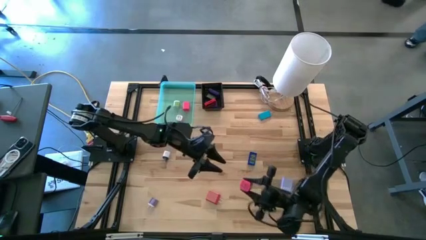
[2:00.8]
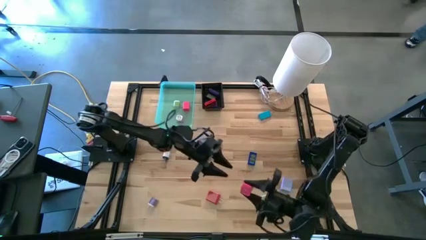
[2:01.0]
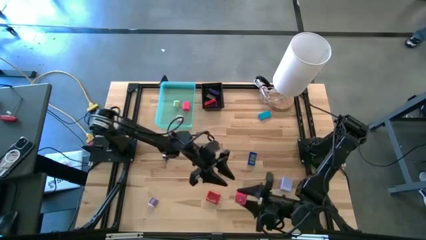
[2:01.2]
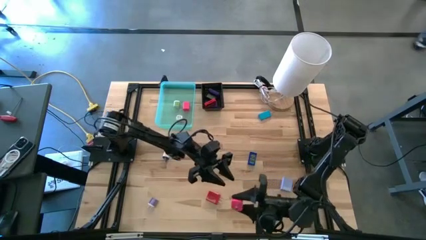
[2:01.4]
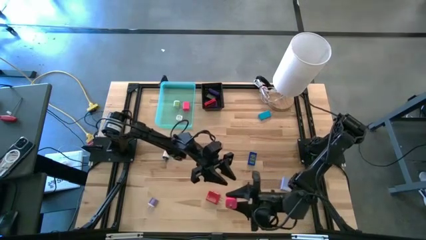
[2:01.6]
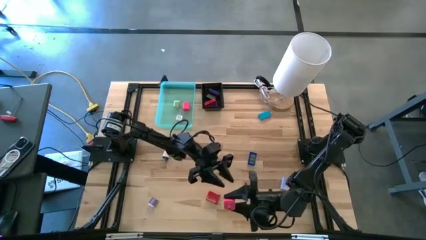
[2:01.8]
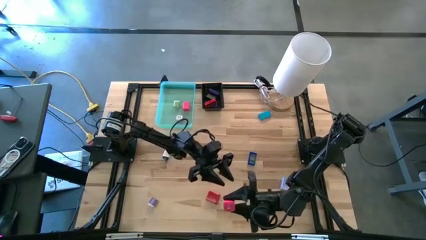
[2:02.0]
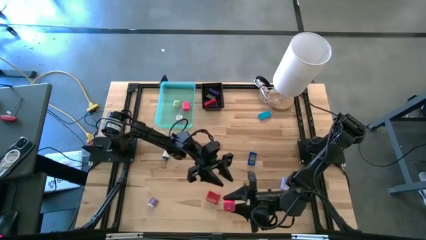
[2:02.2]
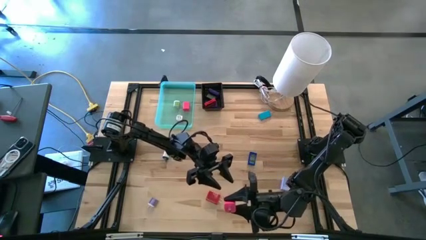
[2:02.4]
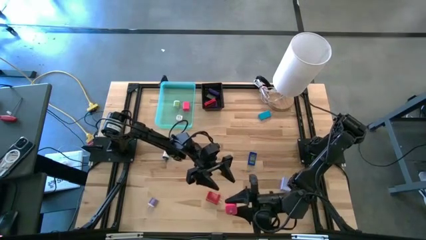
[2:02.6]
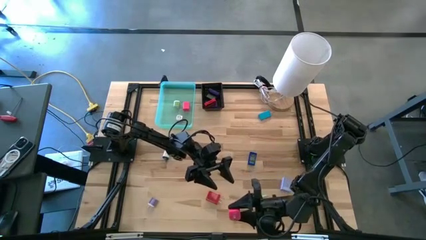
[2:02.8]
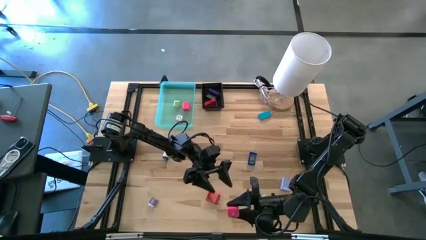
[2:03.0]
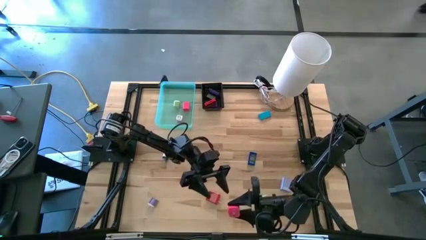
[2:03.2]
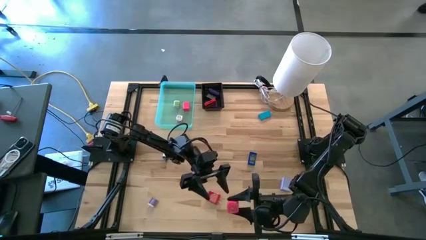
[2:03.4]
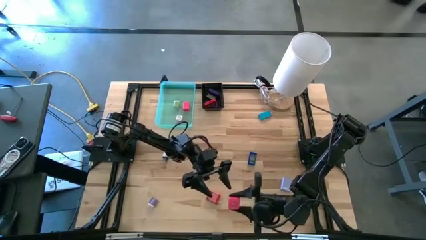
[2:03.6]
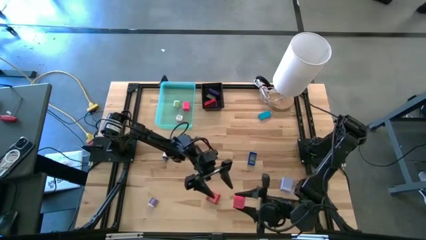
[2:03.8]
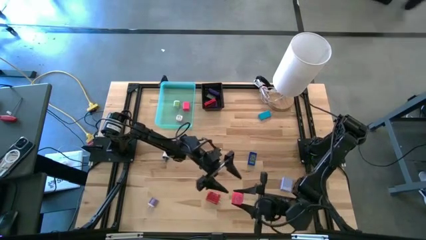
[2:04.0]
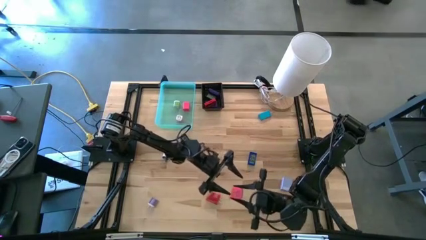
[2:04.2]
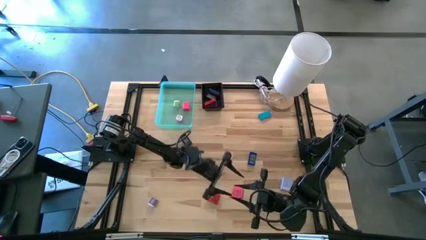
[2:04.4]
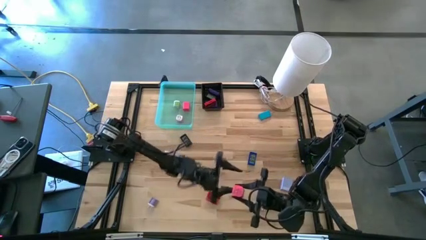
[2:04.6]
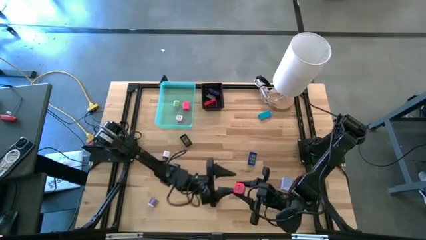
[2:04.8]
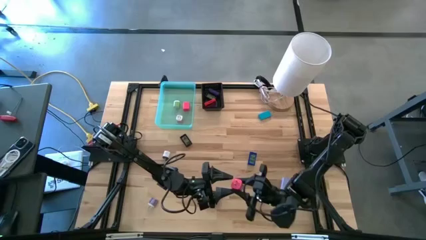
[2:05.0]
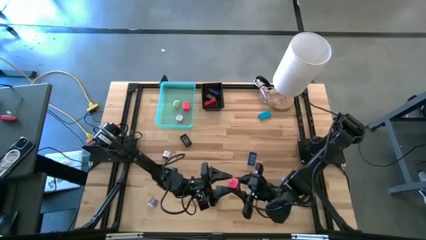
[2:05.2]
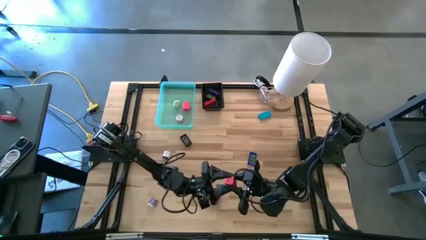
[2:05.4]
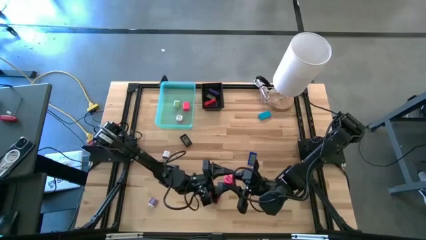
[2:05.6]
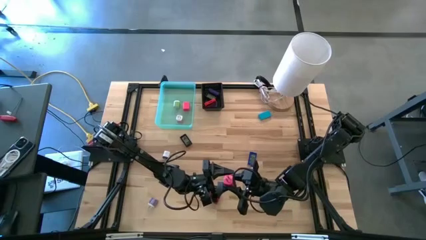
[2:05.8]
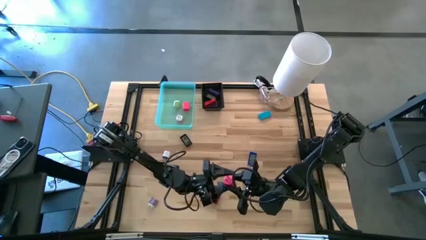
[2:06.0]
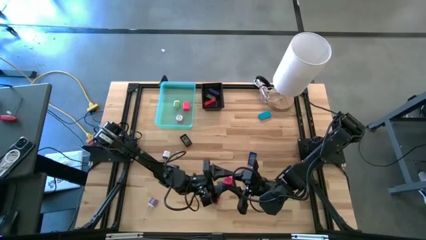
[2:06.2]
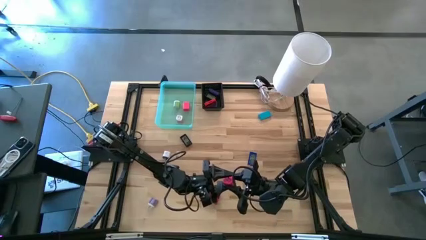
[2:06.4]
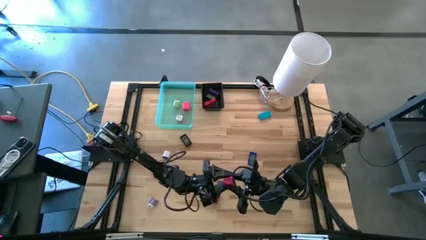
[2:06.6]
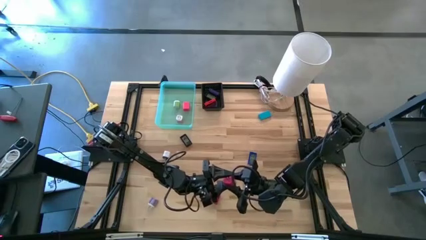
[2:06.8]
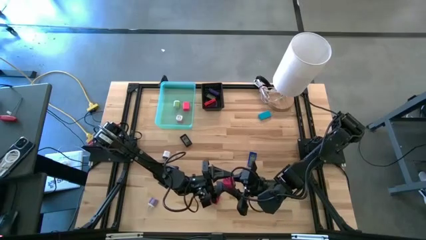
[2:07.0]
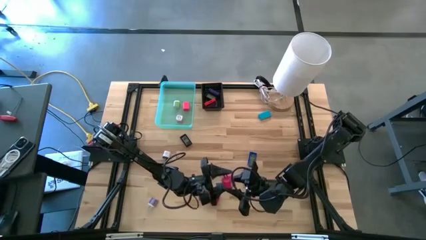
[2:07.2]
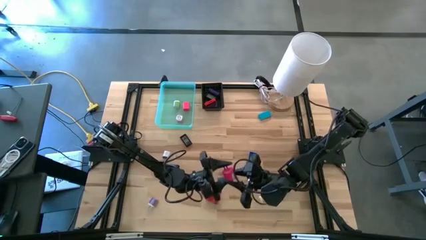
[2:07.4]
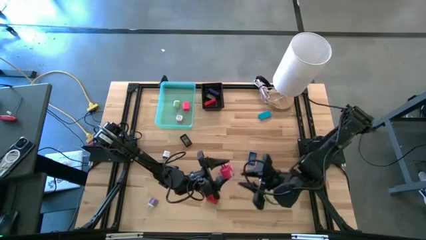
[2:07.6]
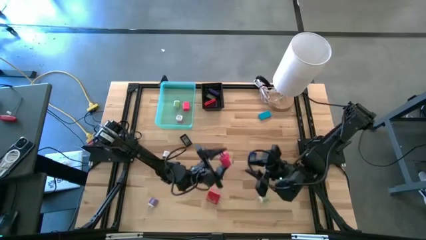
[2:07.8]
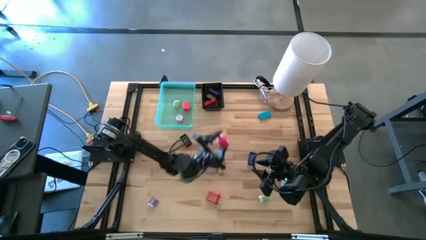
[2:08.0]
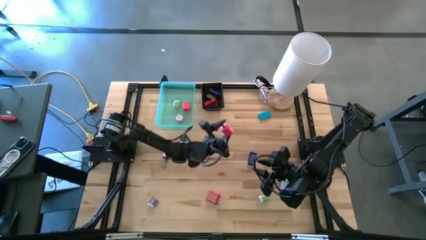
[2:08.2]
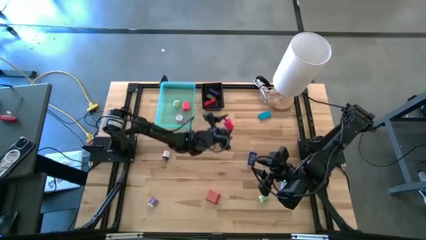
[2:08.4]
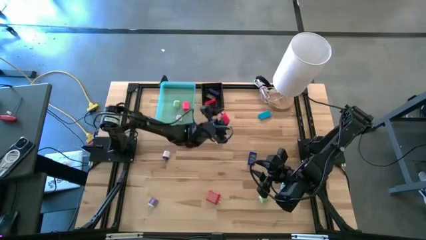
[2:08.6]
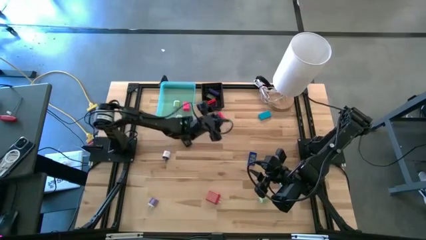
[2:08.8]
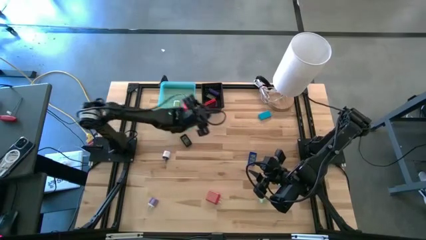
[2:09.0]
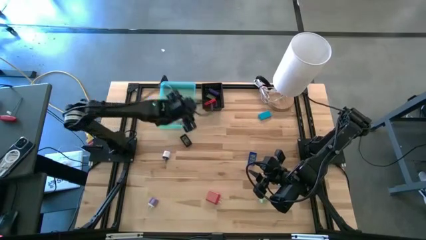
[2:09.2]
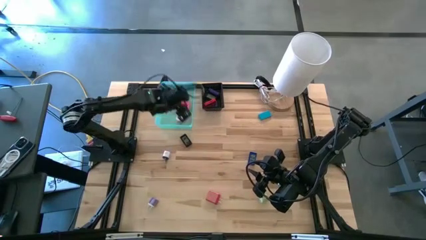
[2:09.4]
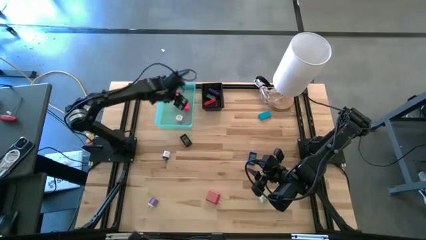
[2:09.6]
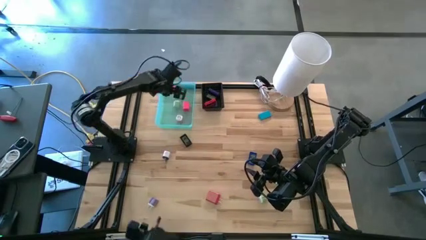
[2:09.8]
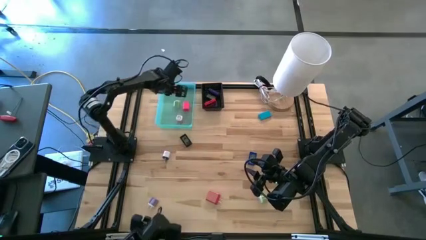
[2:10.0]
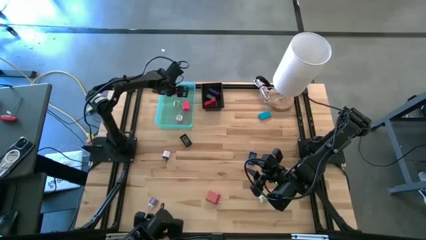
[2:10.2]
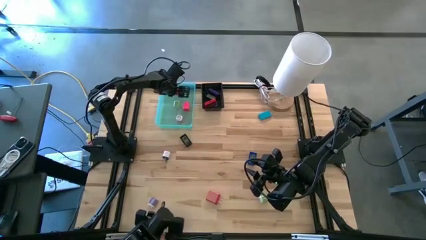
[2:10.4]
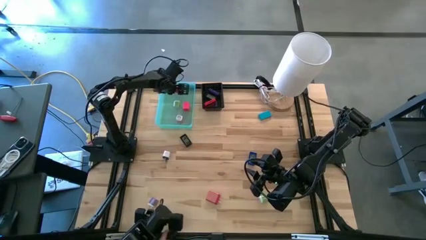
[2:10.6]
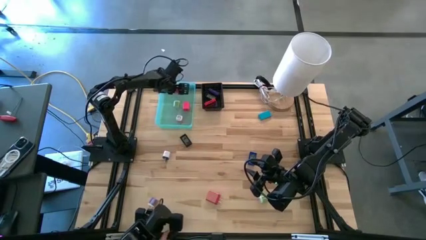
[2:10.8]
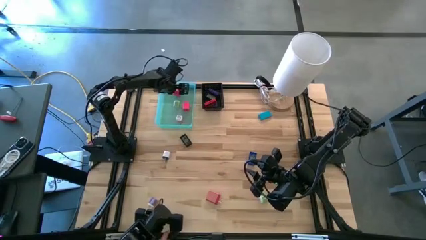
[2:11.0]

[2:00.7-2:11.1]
Task: Pick & Place Office items
Put the pink charger adapter into the green bin

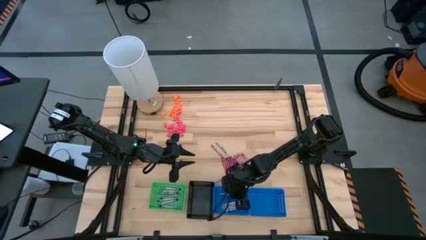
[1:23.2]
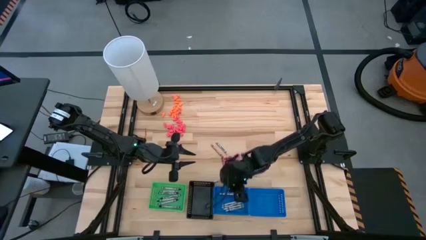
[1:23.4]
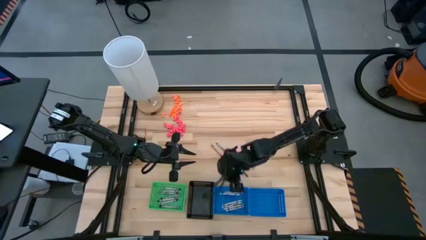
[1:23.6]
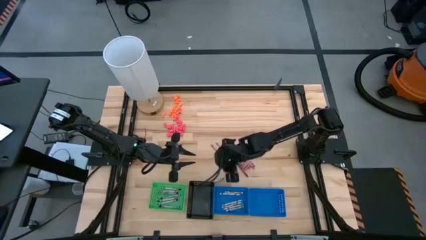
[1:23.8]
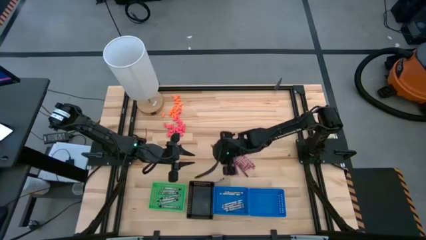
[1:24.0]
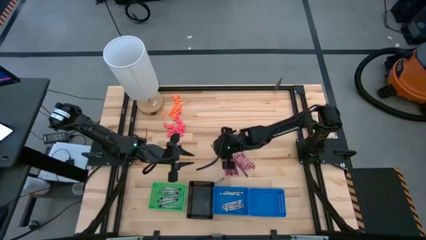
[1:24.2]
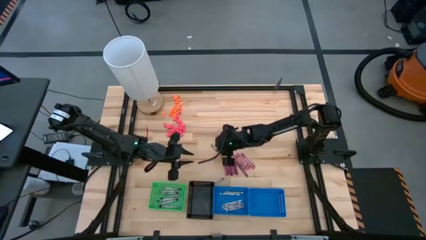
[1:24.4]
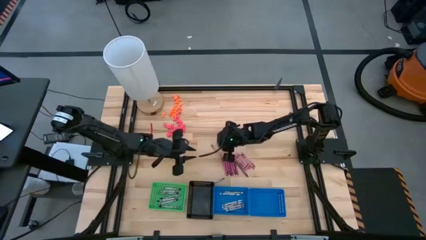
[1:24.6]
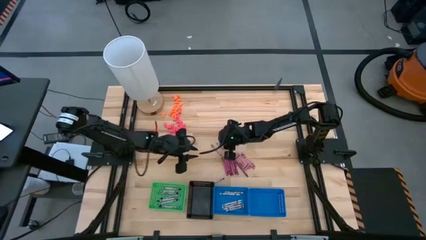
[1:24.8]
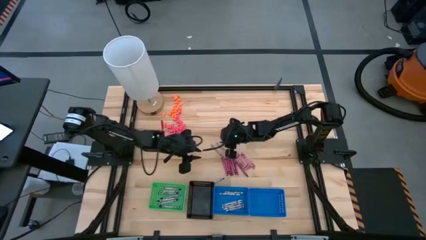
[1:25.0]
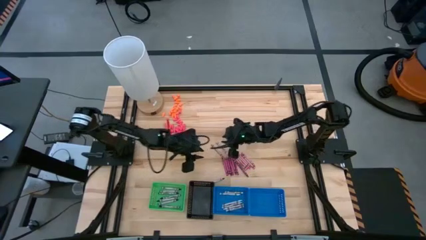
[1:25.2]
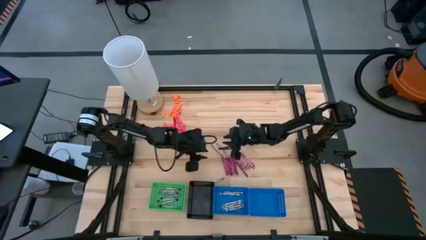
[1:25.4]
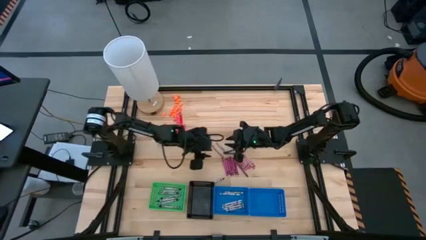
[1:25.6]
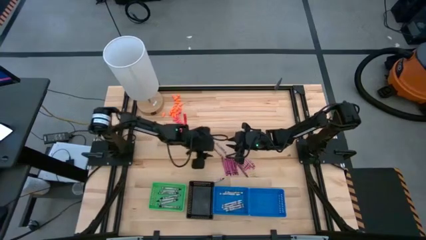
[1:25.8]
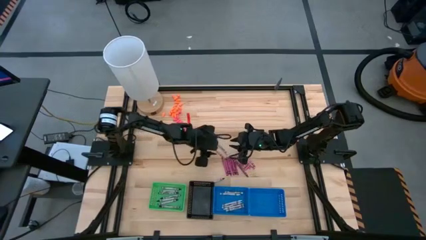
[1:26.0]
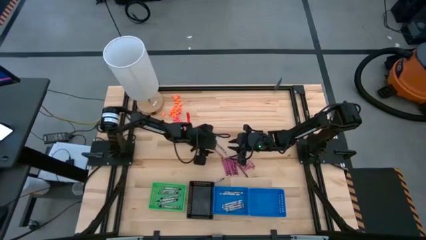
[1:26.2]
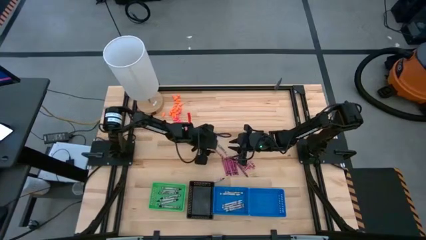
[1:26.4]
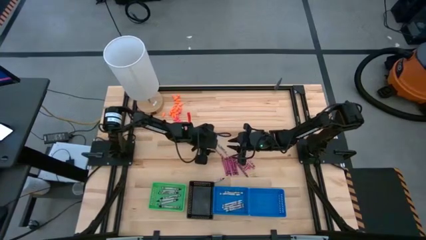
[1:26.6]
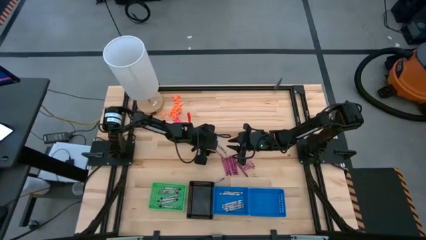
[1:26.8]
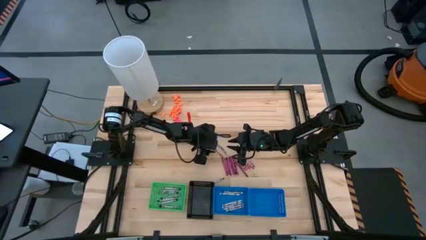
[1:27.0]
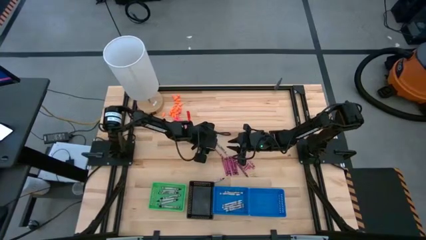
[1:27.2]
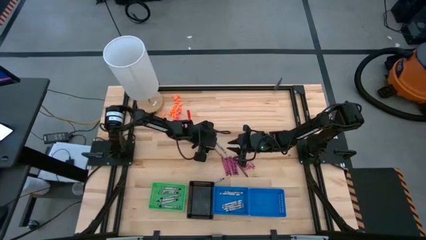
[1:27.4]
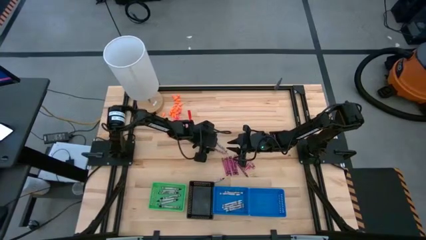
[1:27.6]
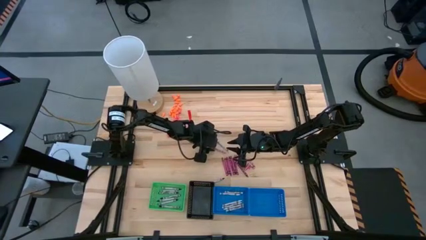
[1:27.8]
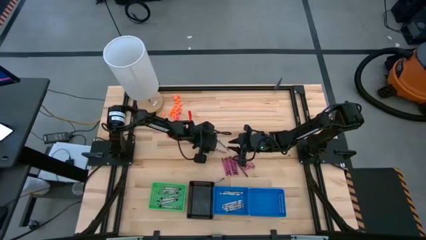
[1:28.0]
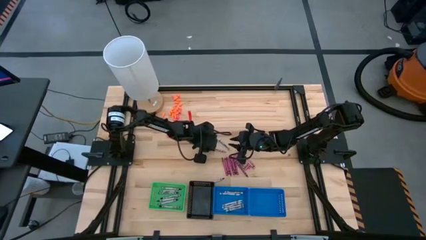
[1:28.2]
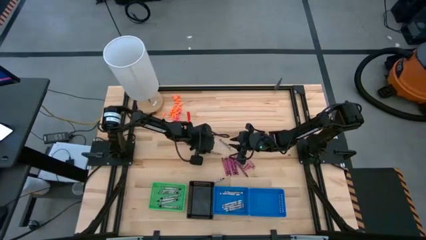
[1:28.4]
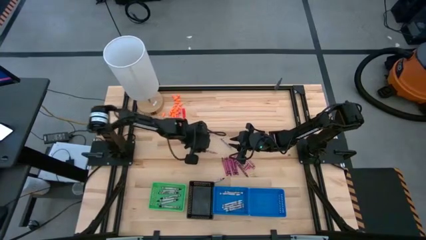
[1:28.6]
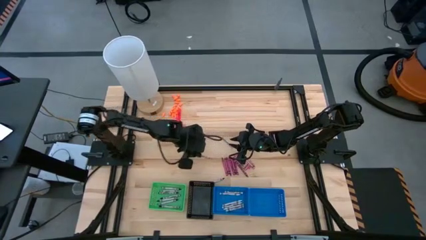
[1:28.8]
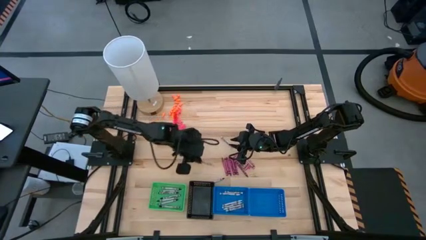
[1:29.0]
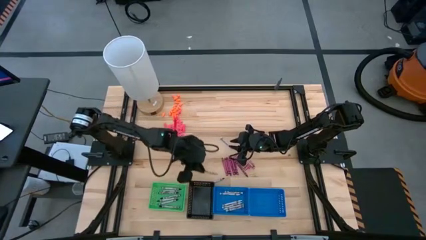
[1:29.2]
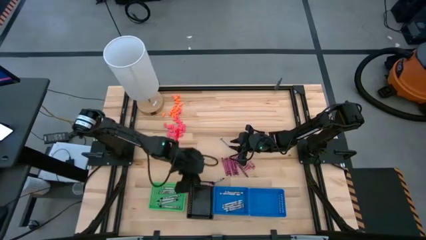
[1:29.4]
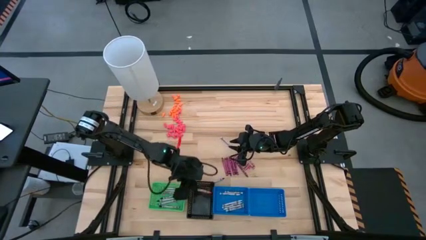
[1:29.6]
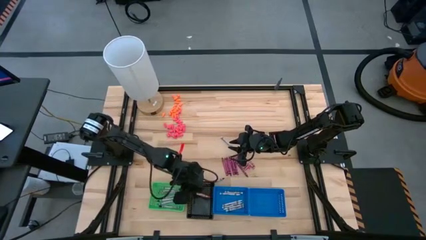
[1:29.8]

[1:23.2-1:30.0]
Task: Sort crayons
Put the pink crayon into the black bin
